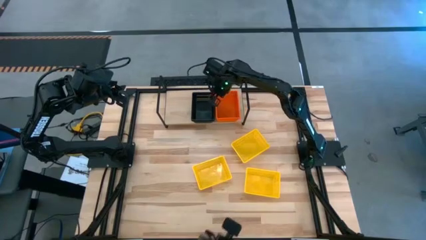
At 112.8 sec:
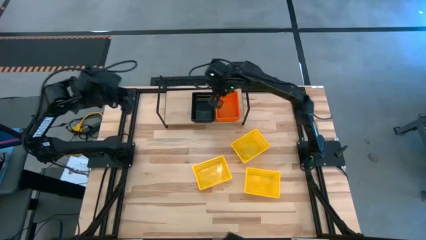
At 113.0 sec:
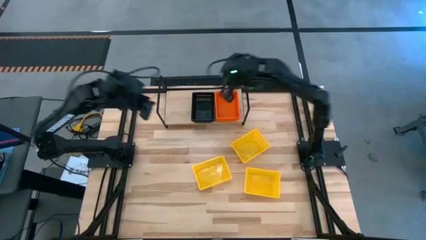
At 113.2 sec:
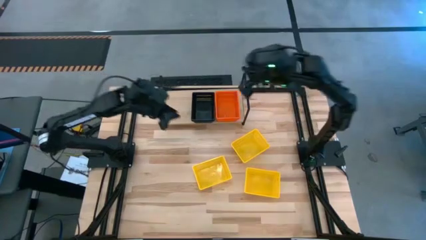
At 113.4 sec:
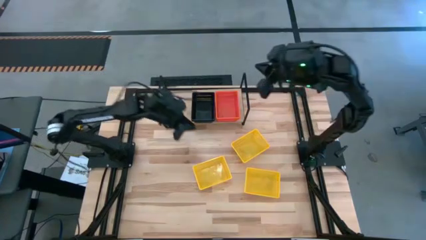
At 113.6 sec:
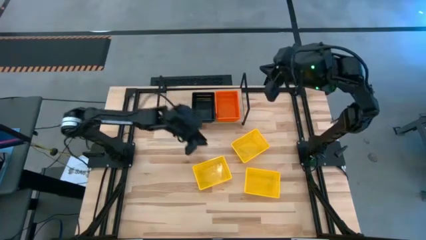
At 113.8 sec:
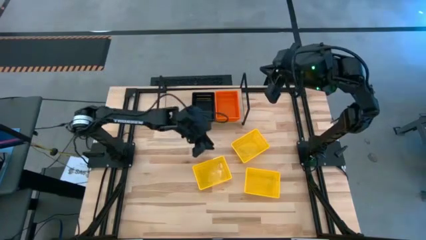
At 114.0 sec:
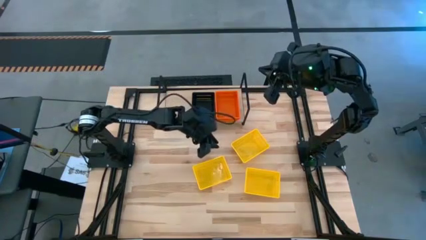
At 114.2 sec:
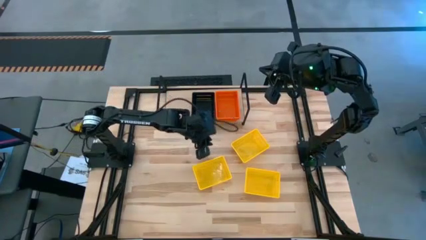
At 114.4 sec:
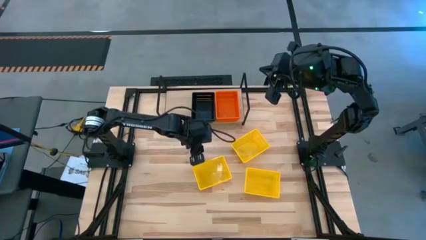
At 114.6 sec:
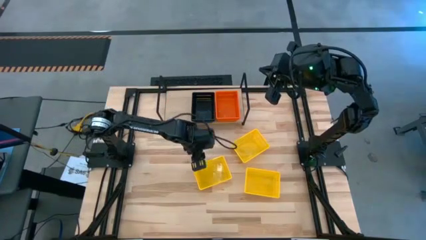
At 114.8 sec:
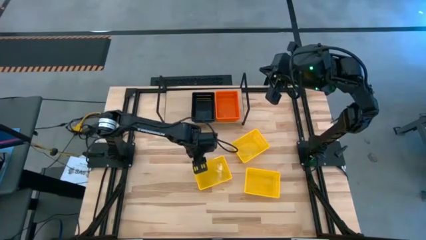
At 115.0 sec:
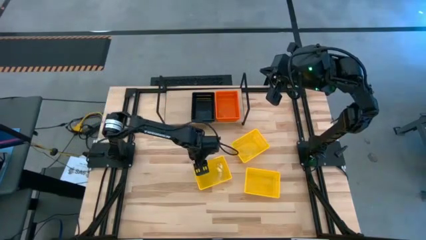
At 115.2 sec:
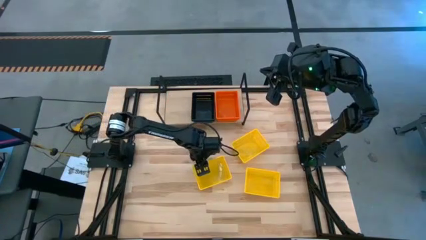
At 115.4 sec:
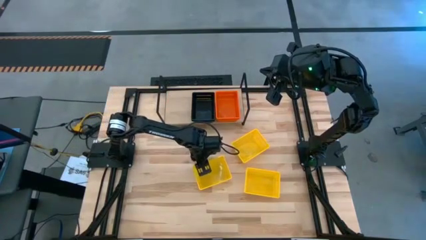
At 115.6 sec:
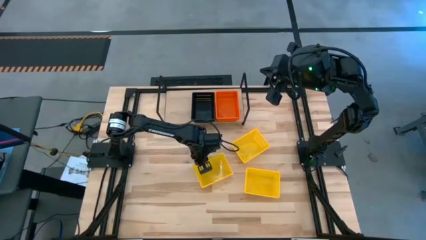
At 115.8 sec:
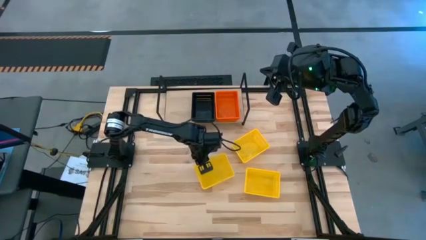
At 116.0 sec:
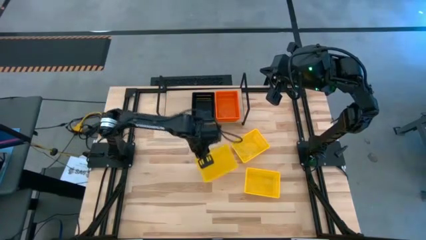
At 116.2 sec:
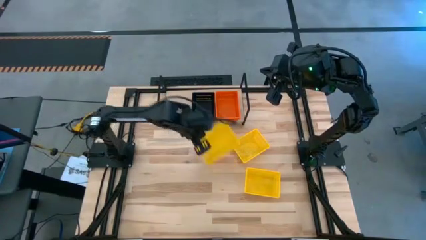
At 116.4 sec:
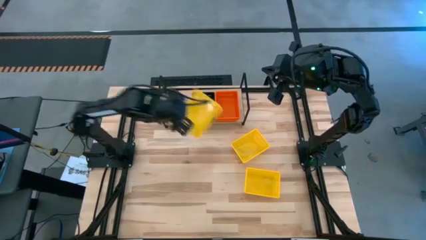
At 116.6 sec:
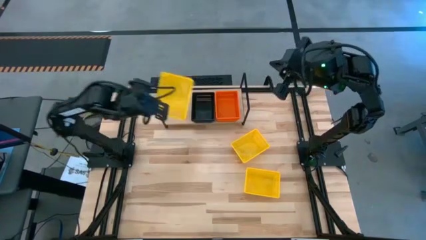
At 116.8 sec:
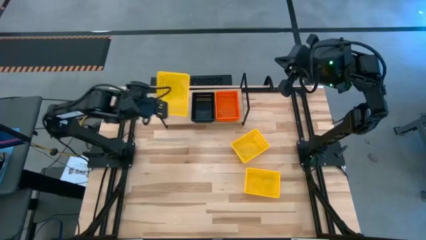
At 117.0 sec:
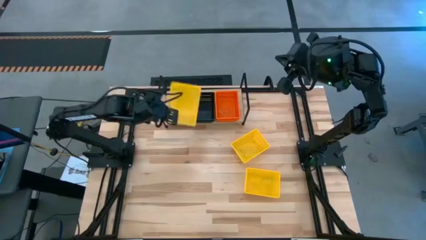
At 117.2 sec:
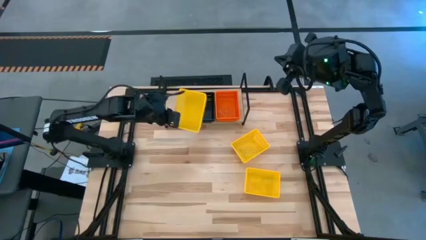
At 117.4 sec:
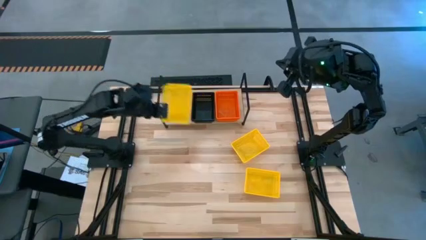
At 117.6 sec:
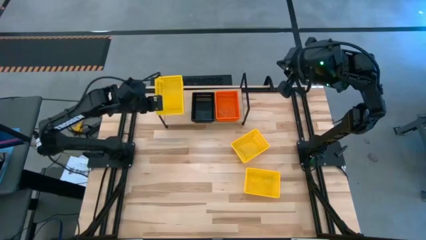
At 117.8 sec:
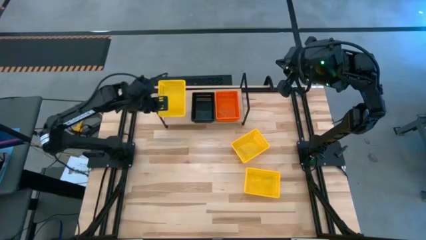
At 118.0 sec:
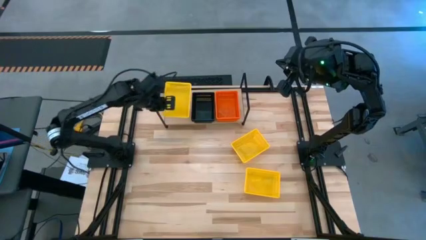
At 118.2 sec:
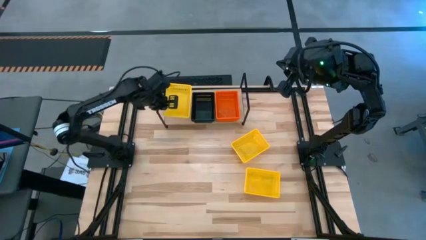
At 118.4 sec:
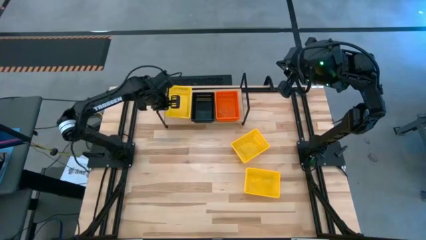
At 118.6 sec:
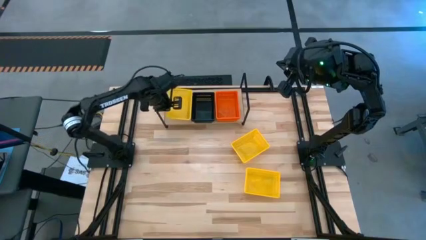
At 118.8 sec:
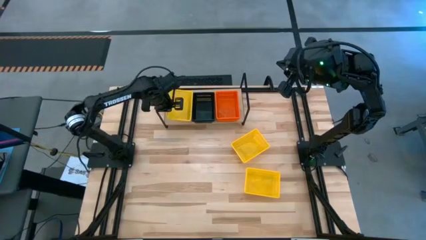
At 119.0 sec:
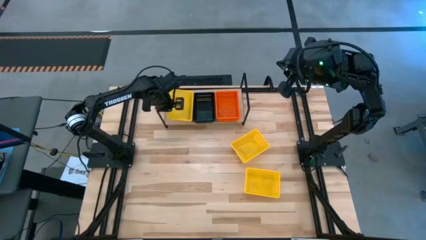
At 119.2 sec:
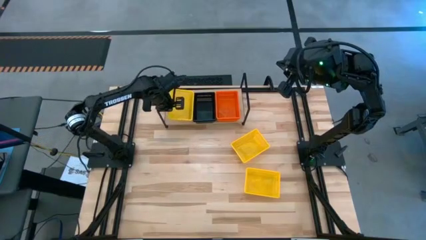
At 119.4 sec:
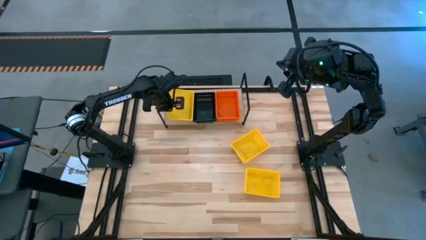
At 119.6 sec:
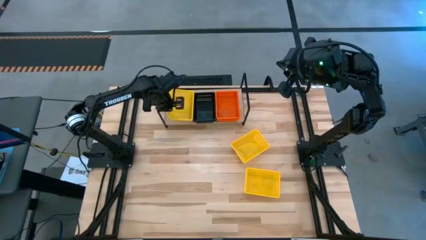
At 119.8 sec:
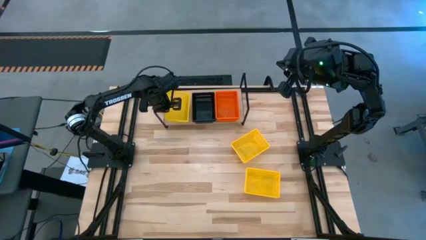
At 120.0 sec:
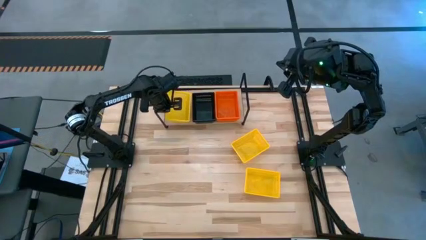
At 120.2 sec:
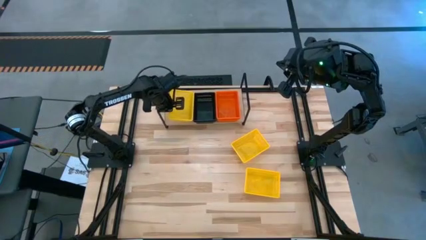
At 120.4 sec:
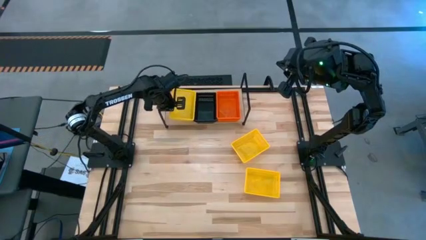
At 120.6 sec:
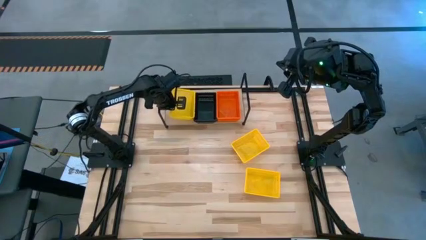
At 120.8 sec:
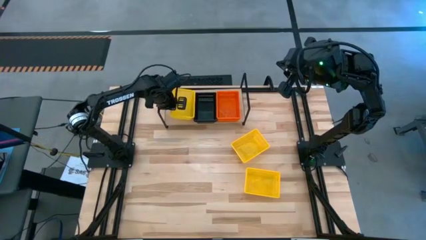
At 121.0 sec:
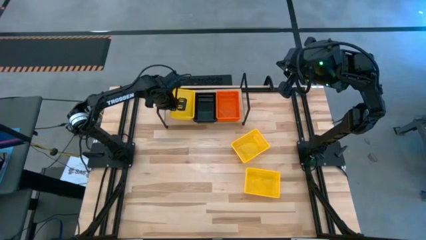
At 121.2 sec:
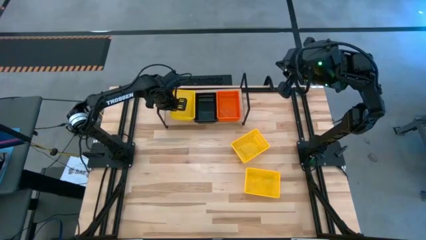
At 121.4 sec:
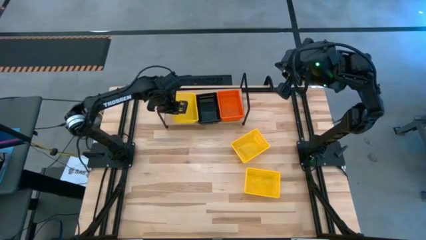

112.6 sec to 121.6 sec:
Task: Stack baskets on shelf by color
Put the bottom left yellow bin on the shelf

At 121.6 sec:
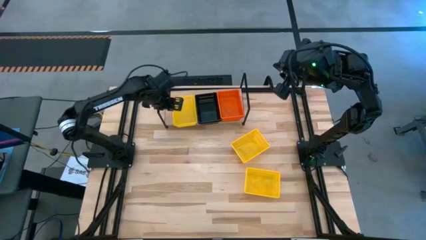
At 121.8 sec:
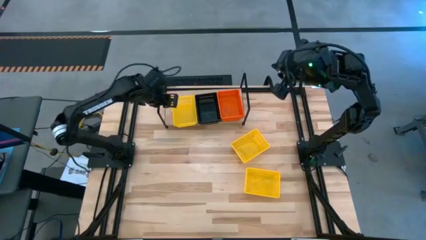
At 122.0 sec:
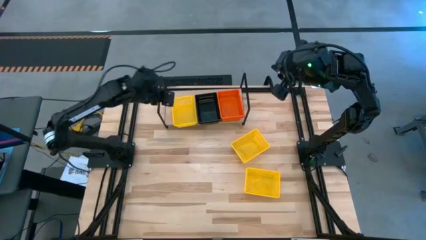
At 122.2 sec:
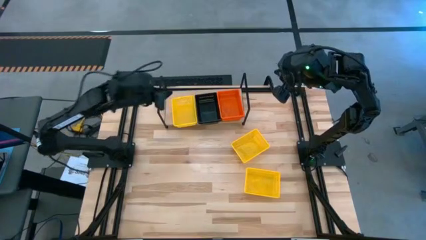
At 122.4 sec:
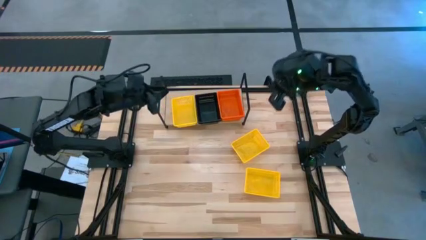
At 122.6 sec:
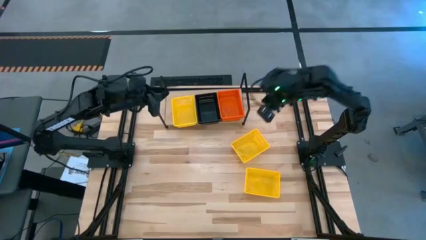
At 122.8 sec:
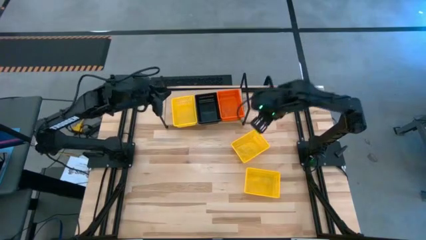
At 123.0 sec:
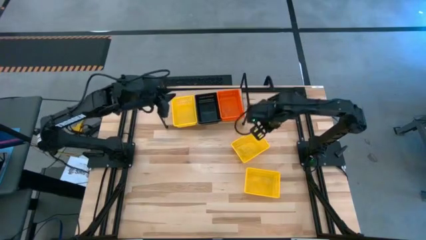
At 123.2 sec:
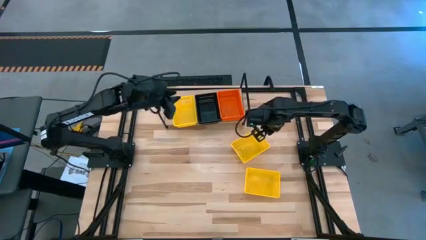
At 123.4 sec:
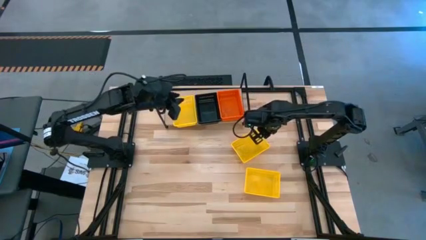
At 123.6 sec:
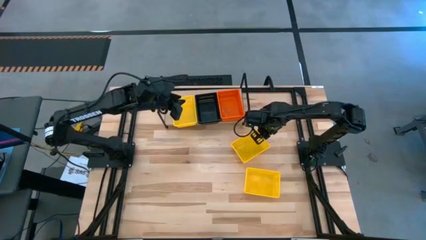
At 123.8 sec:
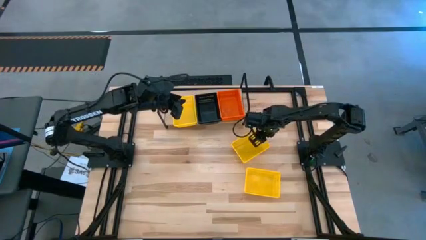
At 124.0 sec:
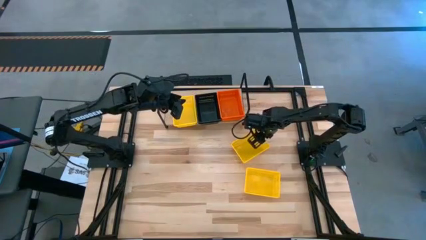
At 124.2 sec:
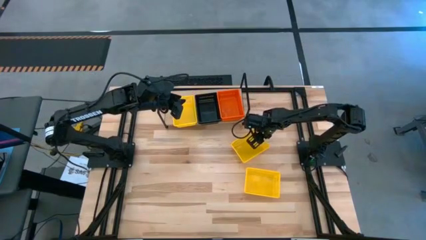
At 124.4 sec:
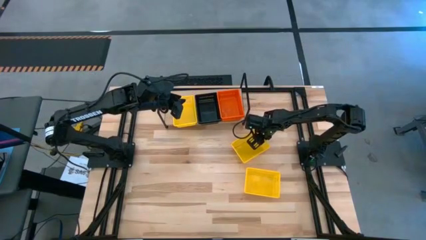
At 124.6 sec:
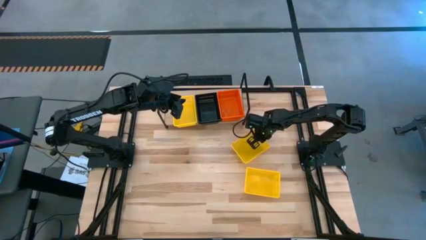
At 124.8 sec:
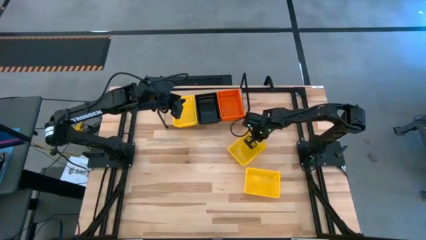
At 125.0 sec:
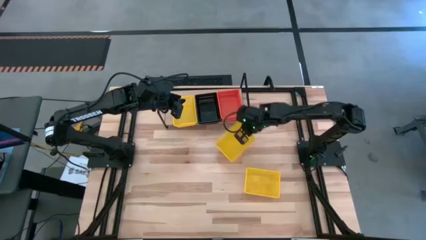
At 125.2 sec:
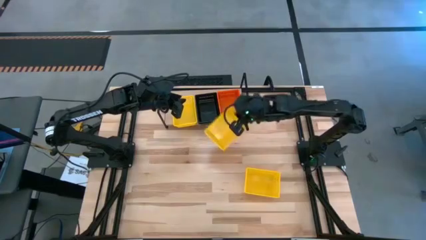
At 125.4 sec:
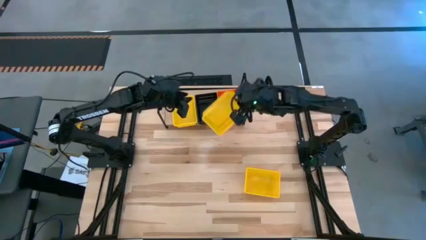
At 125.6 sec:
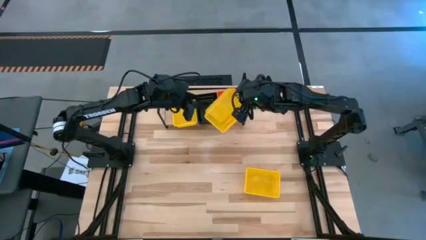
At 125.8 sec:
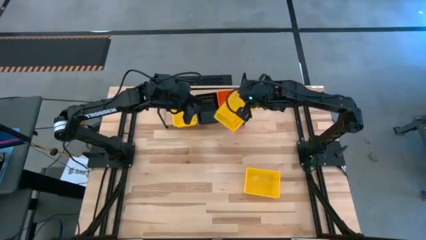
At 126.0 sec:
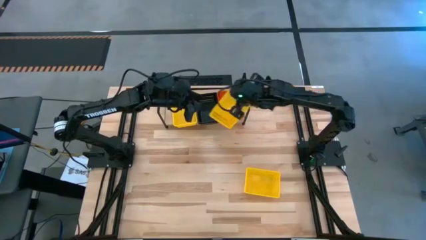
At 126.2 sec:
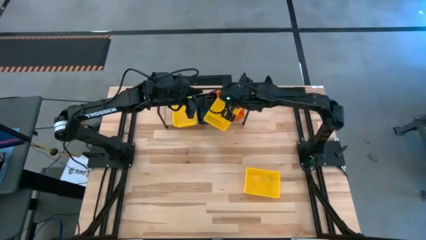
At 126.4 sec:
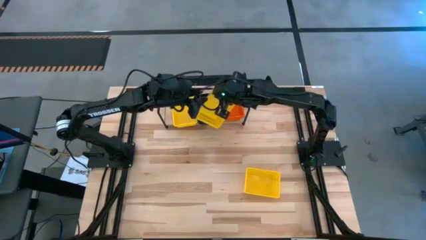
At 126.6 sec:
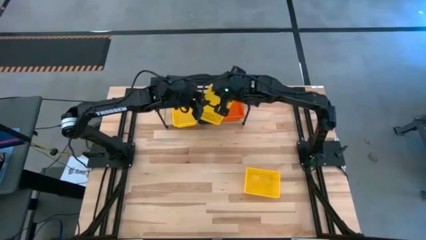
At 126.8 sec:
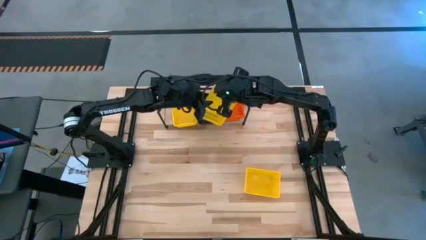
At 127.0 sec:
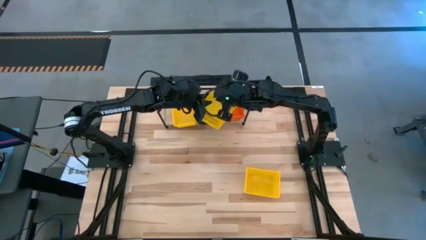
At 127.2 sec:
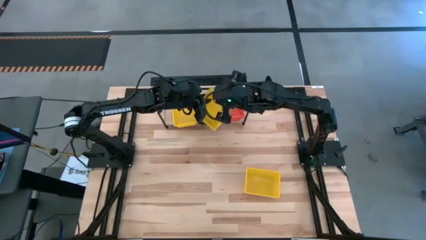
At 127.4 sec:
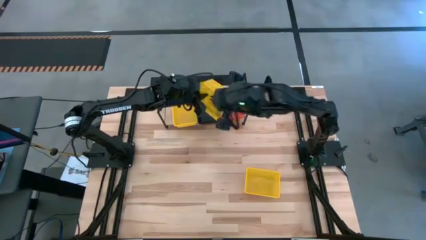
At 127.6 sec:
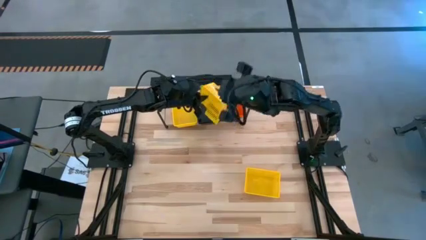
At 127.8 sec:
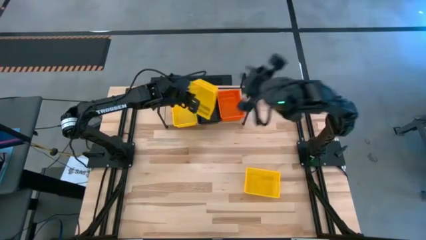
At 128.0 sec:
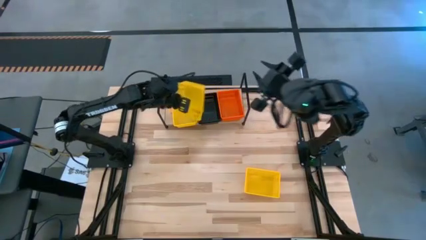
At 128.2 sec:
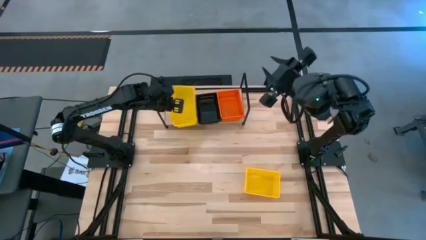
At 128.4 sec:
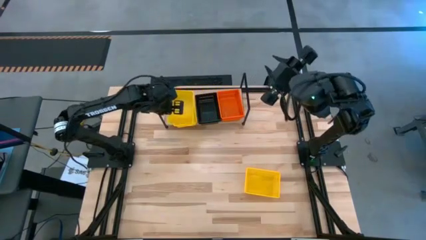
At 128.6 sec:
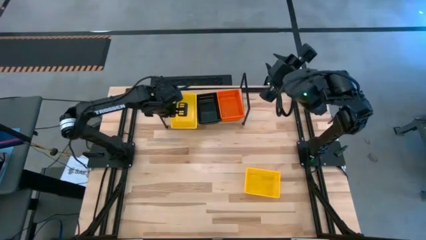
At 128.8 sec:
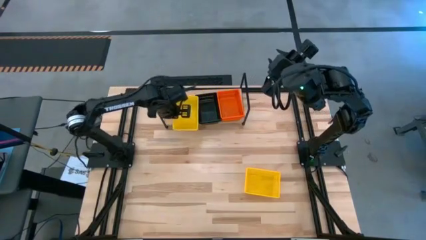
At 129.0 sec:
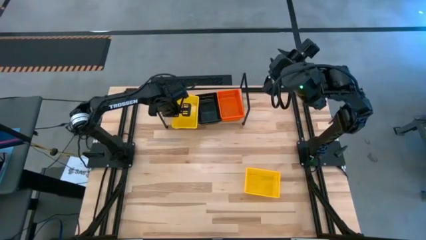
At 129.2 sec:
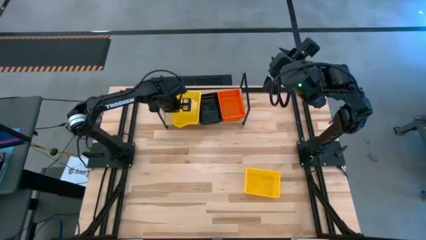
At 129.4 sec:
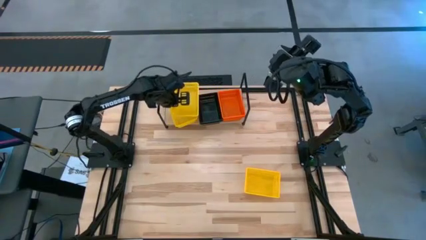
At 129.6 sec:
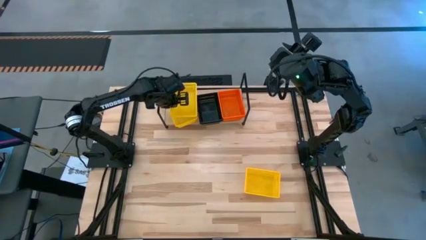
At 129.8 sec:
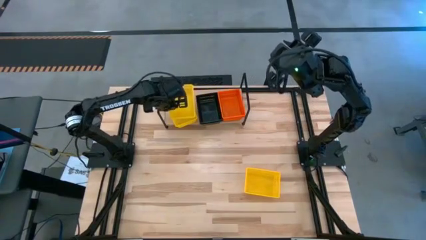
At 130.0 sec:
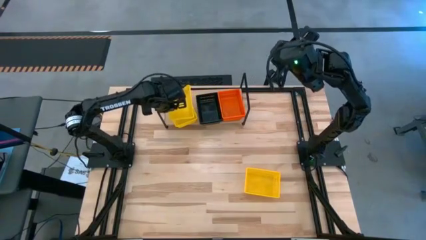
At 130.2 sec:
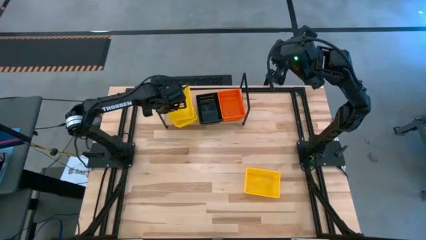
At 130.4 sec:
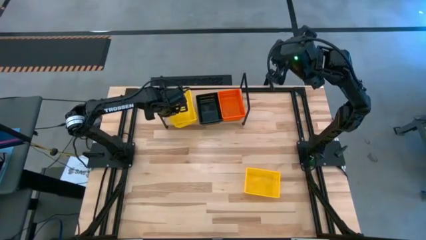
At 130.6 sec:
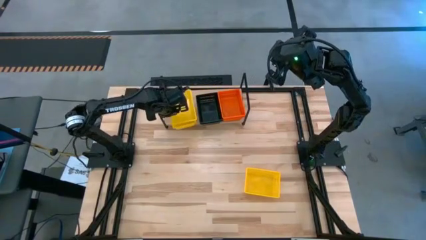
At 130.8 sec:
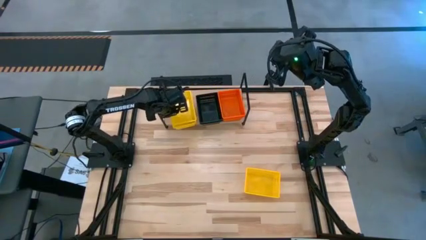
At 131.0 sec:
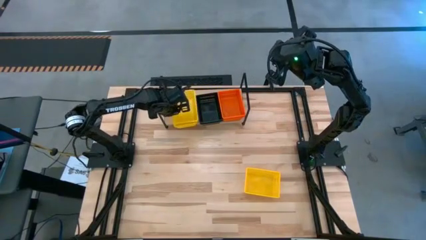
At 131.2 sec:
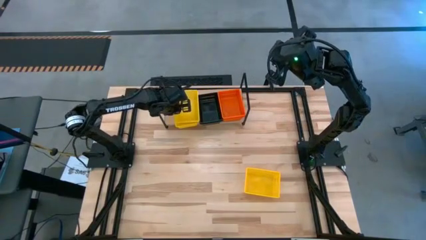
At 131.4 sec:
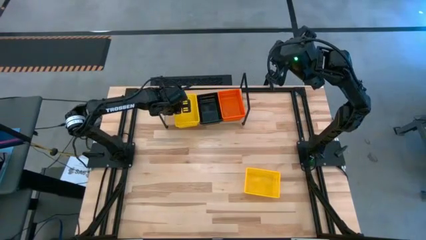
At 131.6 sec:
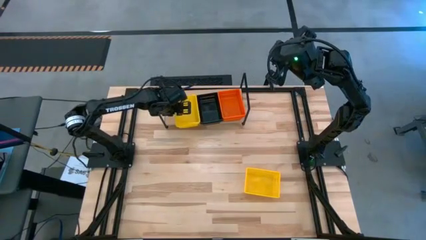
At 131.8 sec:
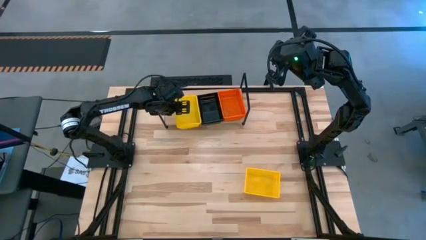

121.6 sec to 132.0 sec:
Stack the top yellow bin on top of the yellow bin on the shelf
